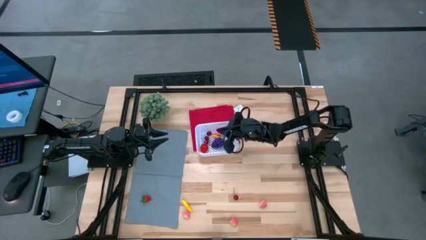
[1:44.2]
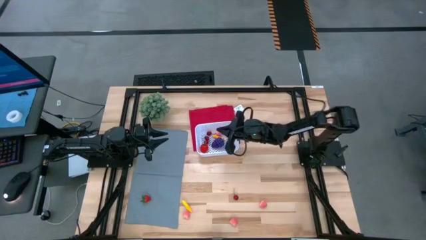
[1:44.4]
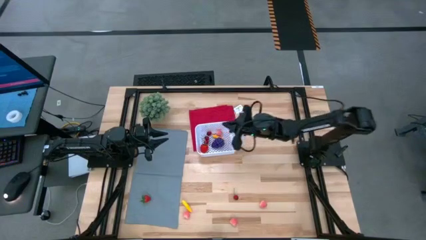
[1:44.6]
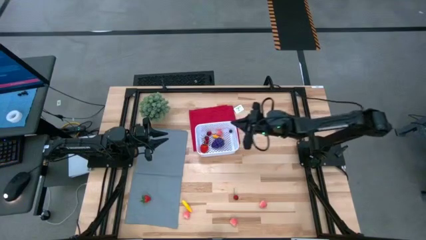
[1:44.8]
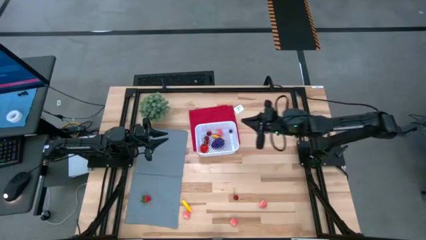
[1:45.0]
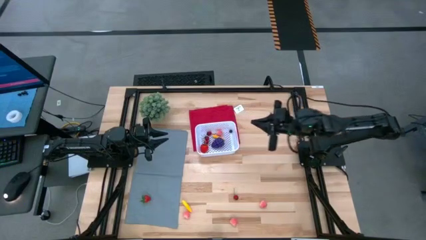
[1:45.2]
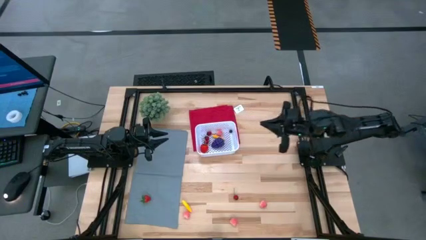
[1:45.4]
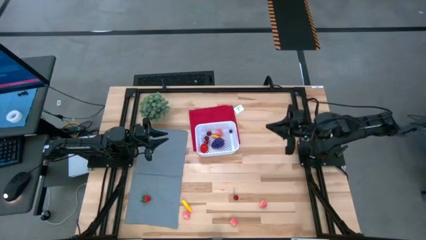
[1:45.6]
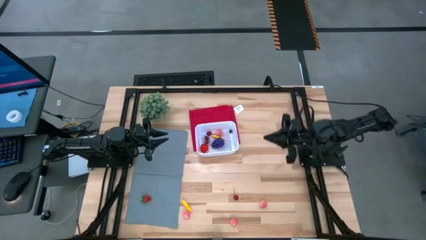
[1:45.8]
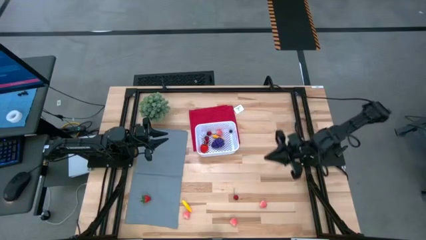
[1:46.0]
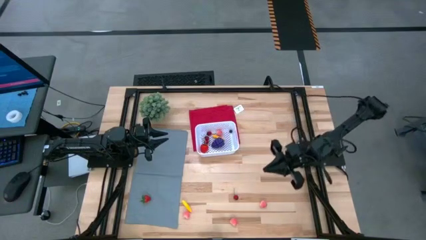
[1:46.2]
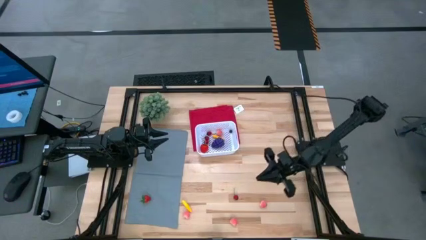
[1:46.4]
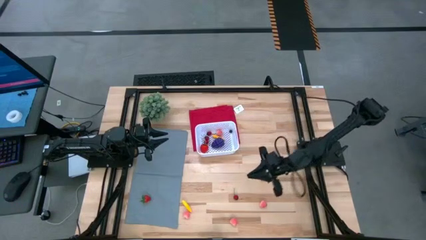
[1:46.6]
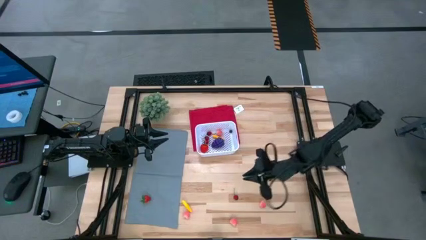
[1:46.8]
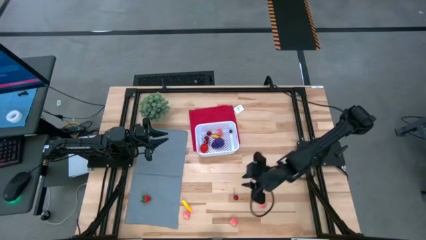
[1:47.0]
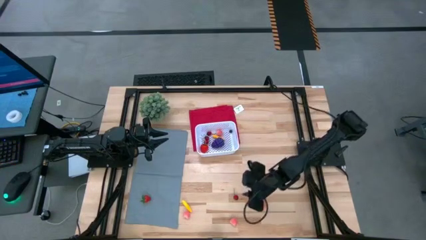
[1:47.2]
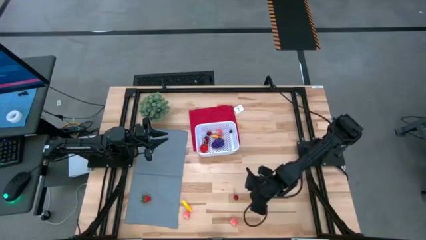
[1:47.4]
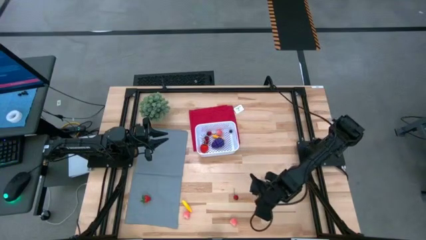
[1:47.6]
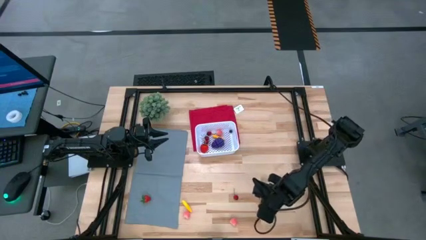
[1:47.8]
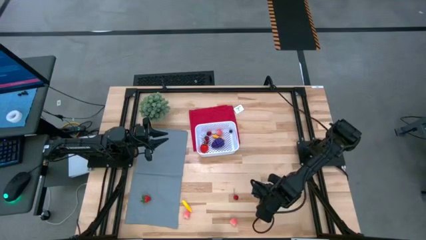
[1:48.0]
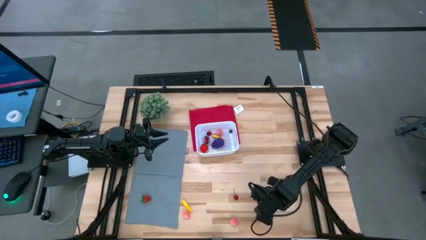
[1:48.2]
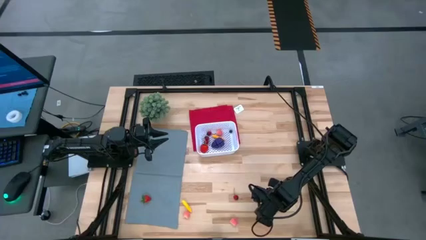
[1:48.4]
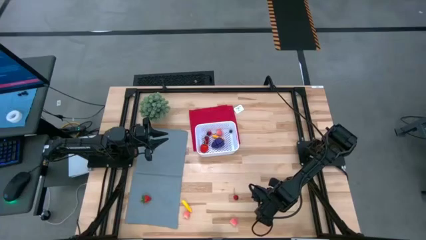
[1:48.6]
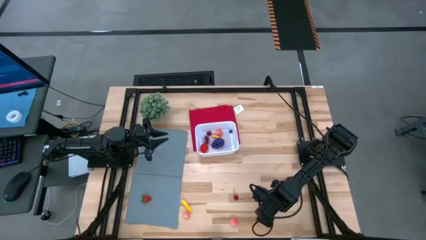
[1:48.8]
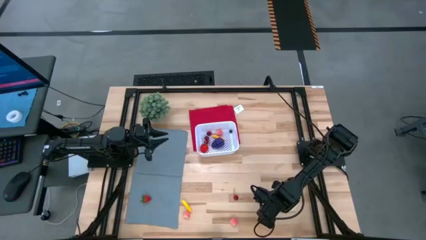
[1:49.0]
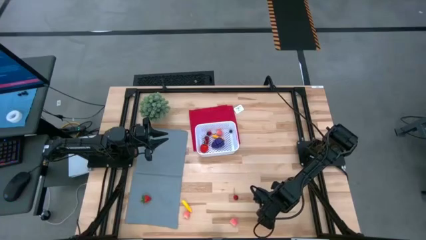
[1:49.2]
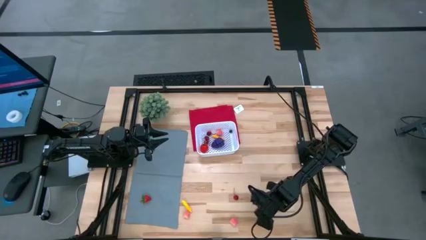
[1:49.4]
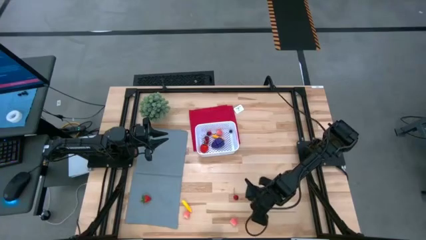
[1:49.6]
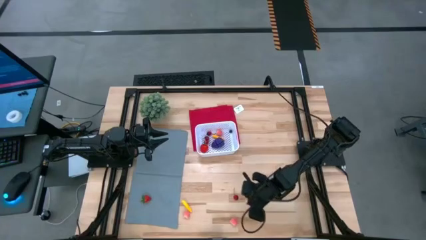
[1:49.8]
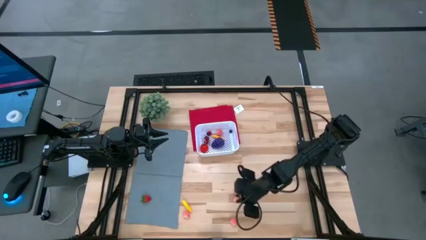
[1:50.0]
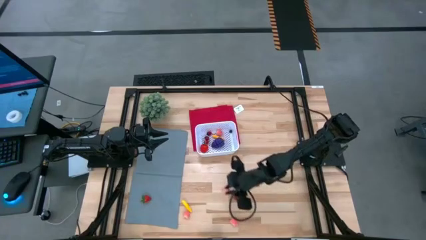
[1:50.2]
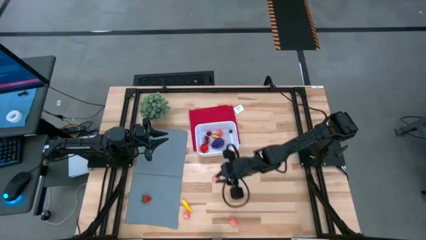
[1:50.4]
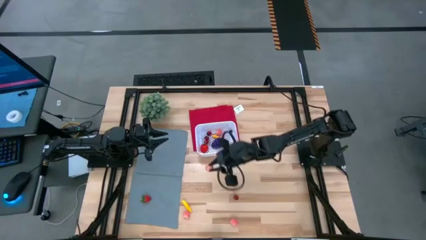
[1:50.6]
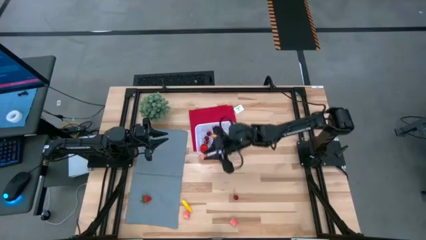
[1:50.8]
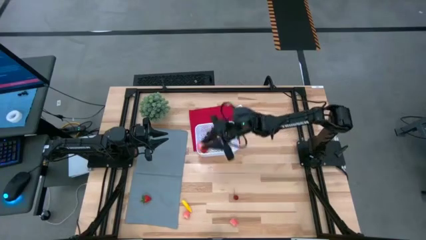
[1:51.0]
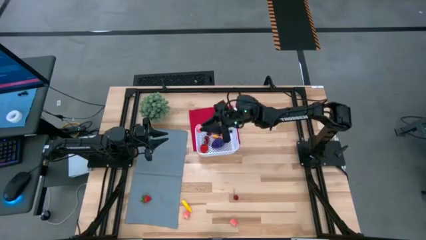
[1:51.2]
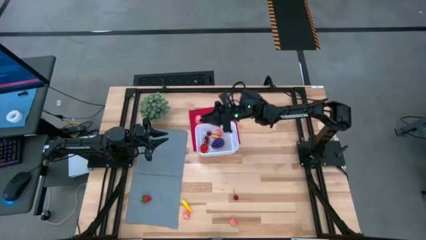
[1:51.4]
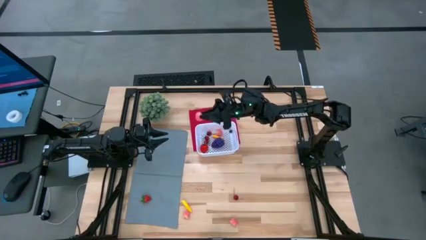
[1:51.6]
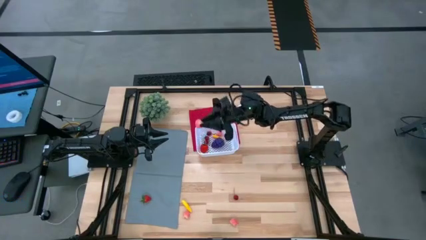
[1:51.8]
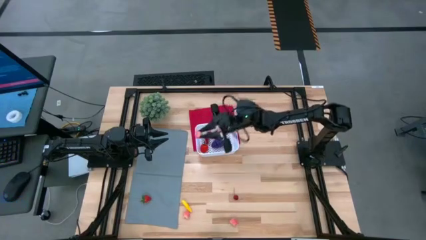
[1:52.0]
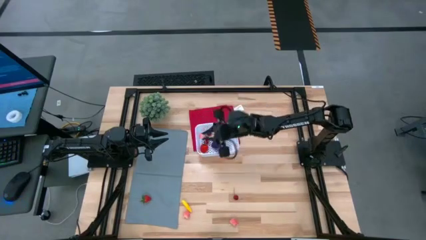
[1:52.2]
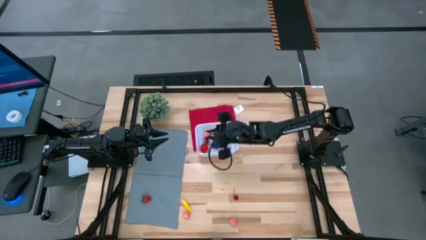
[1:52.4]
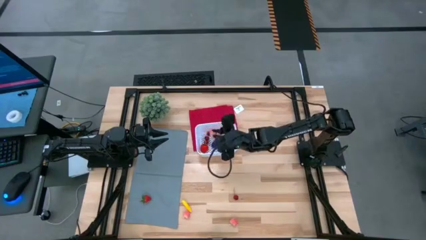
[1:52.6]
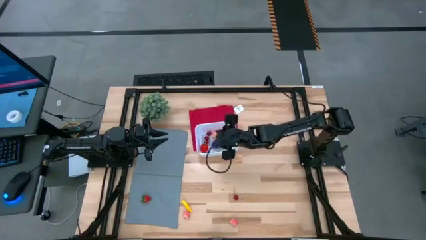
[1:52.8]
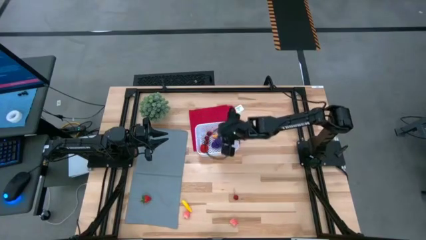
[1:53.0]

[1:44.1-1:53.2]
Task: Pick and placing Produce into tupperware
Put the pink peach into the white bin

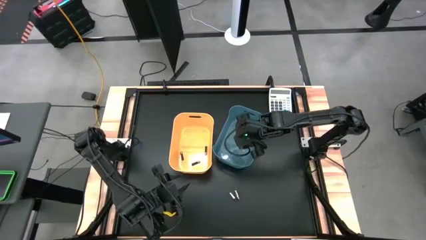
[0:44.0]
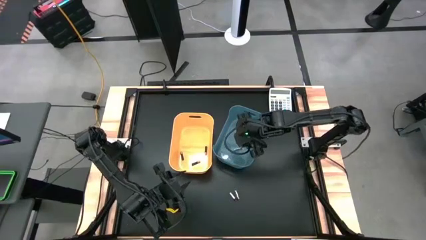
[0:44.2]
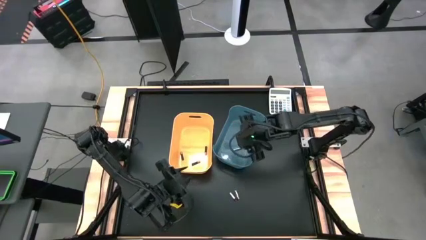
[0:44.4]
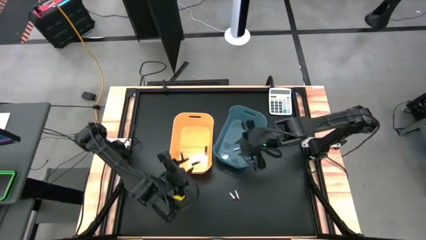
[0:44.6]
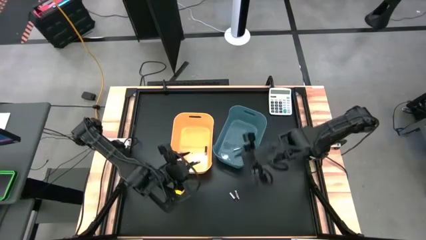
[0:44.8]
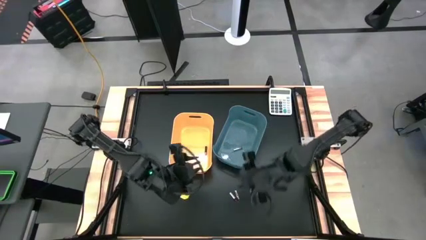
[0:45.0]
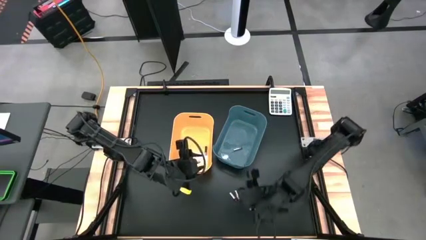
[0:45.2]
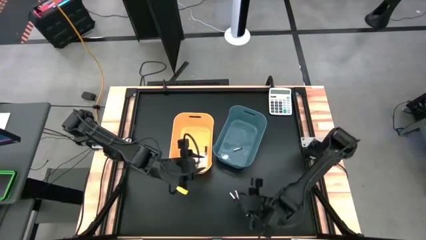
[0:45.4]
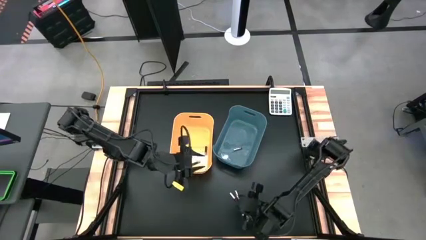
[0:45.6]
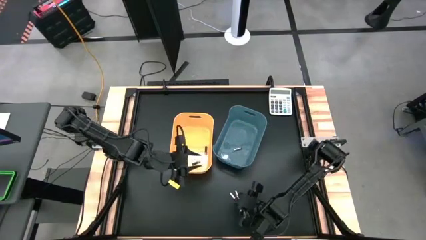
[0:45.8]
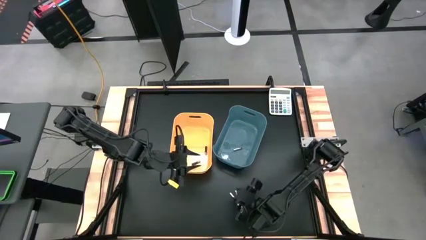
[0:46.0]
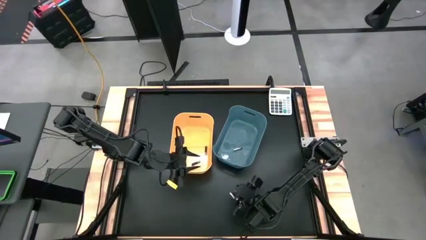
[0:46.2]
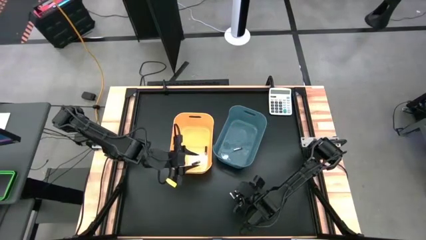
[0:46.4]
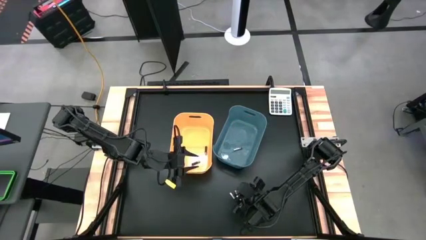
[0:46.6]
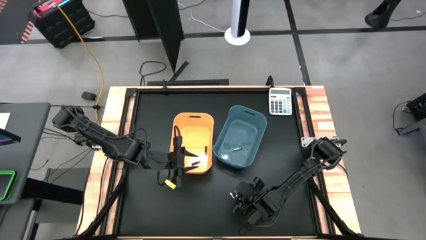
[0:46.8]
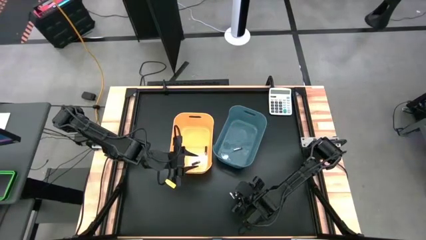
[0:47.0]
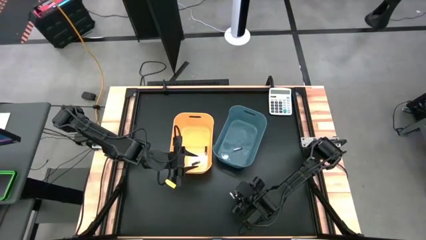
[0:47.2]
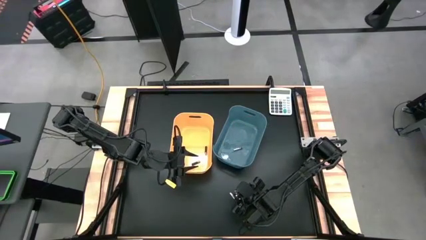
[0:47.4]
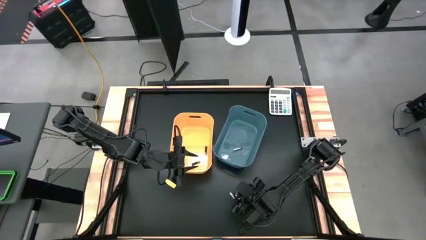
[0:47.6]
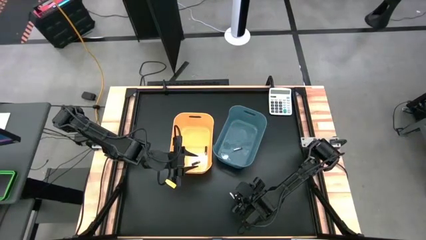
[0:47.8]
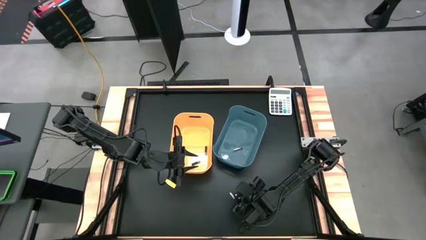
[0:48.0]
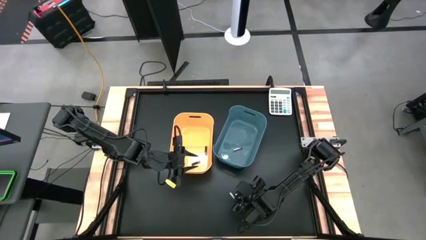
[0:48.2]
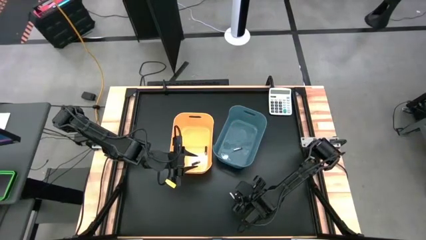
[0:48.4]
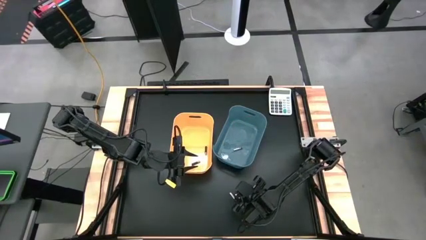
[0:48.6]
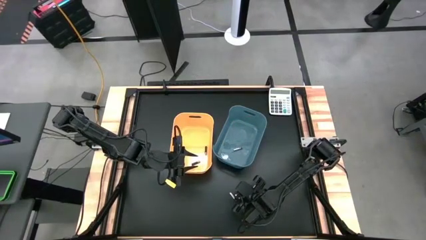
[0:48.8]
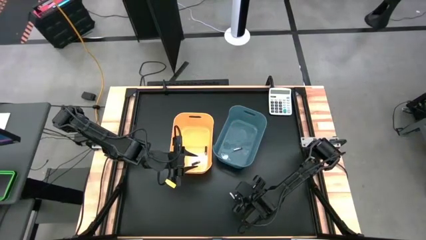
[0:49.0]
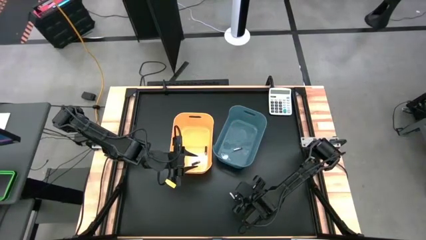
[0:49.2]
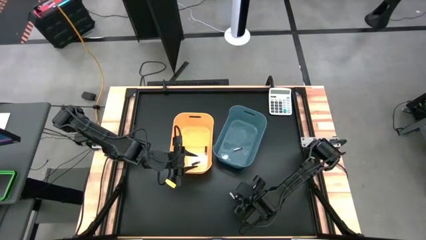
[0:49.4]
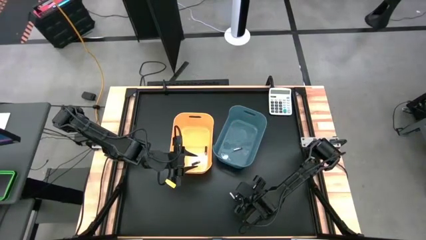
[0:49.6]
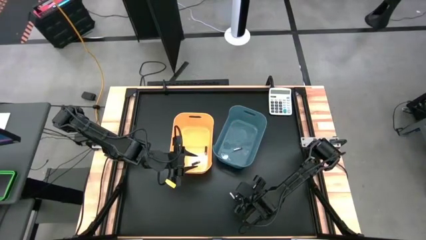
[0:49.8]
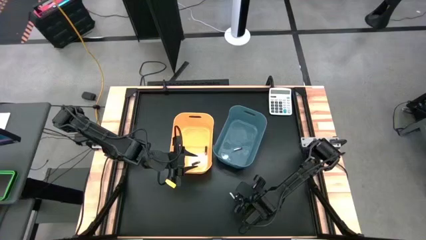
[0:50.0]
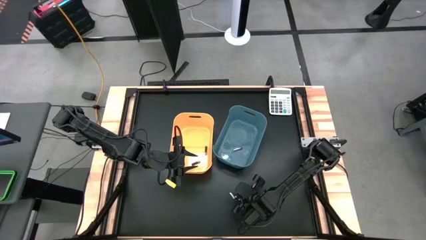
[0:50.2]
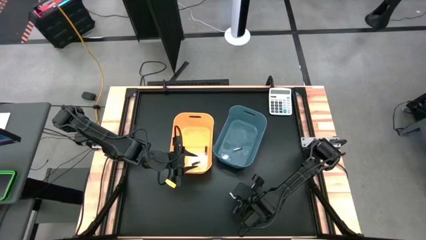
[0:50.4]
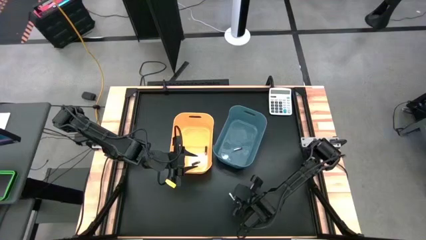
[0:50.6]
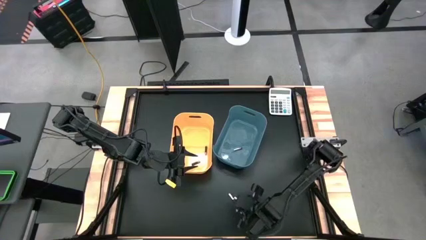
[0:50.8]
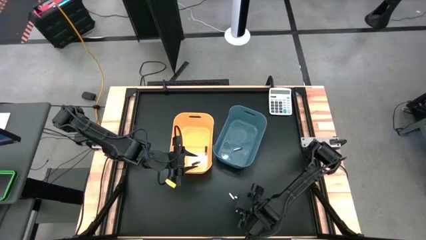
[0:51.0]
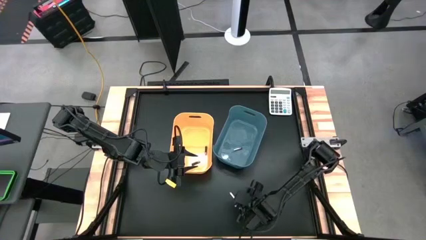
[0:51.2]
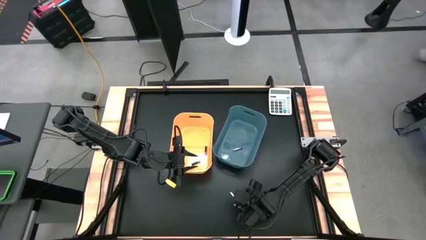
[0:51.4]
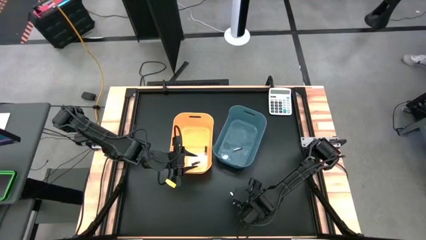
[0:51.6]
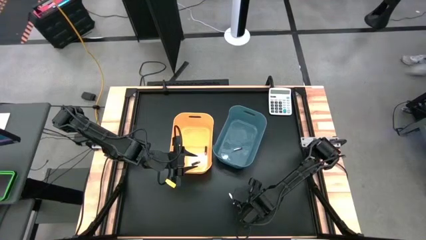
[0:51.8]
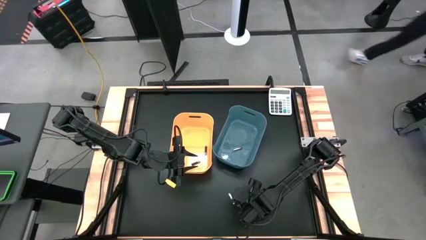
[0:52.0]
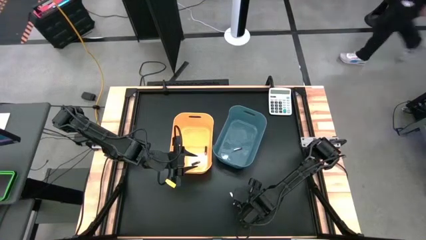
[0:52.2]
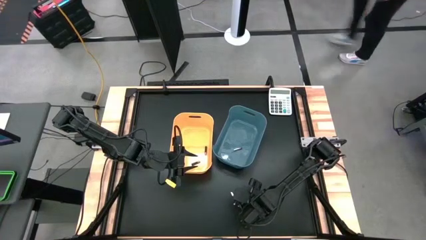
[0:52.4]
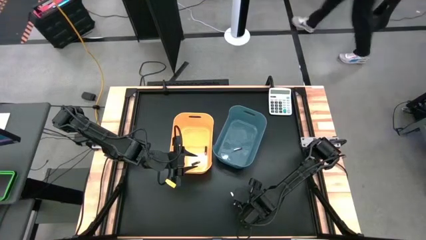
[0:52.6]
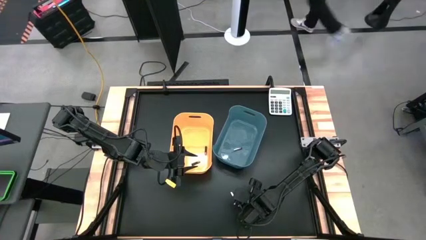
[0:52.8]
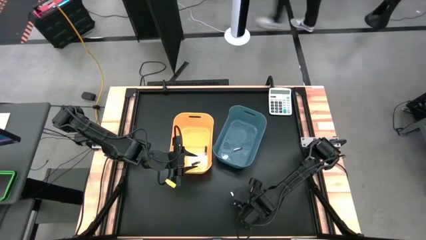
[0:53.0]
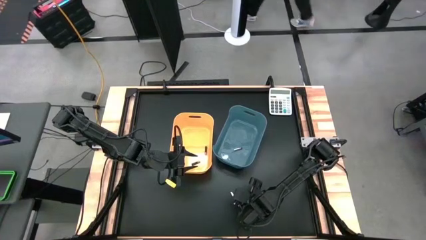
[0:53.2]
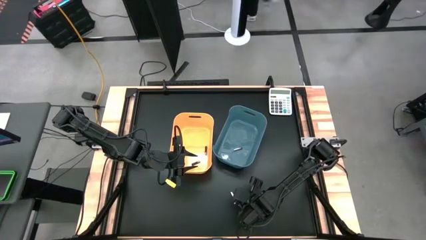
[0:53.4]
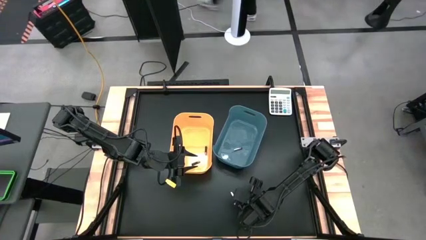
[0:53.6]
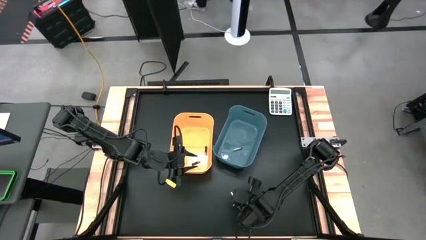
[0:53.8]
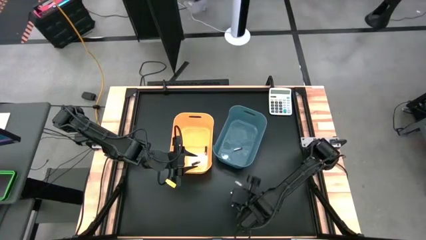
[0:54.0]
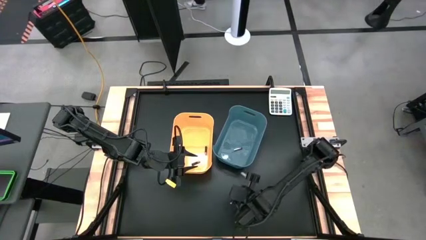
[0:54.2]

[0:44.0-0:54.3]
Task: Sort batteries
Put the right silver battery in the blue bin
